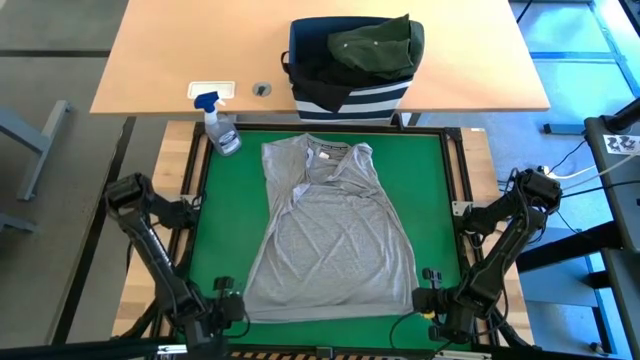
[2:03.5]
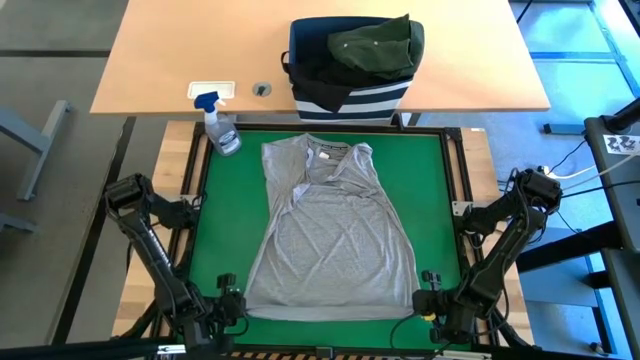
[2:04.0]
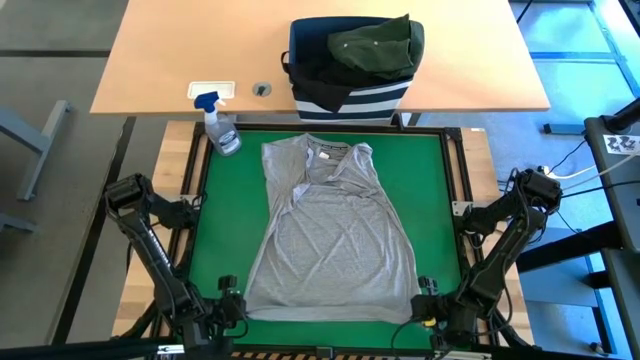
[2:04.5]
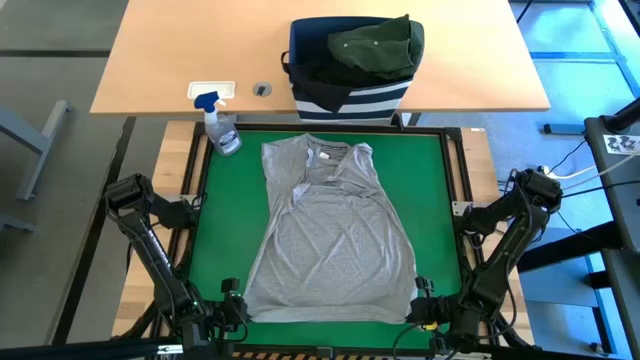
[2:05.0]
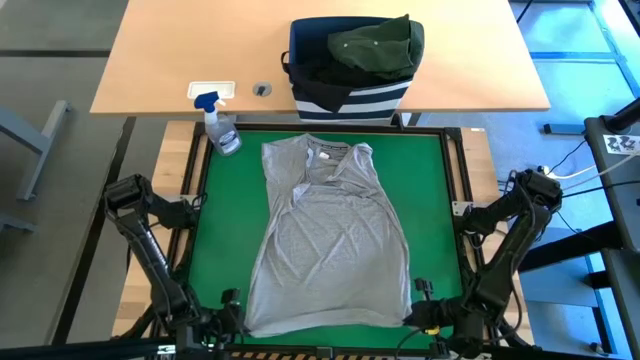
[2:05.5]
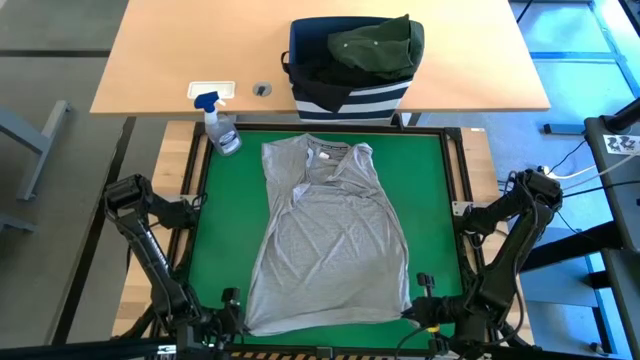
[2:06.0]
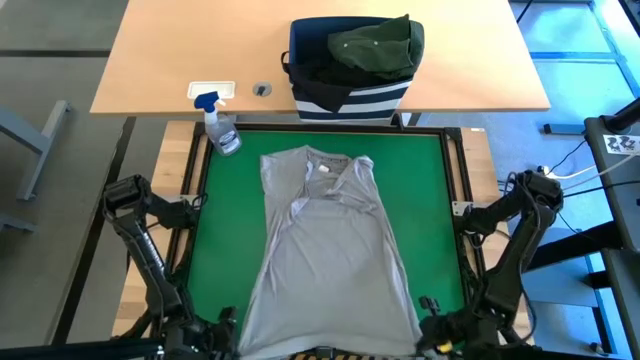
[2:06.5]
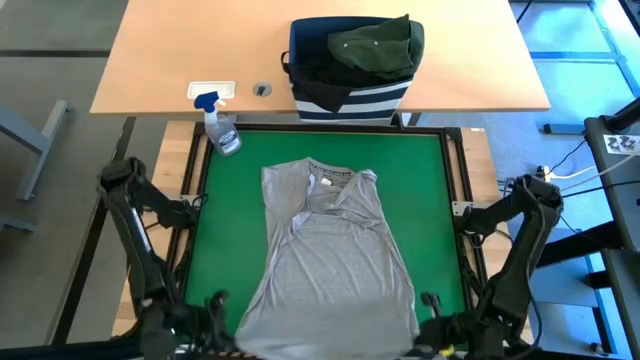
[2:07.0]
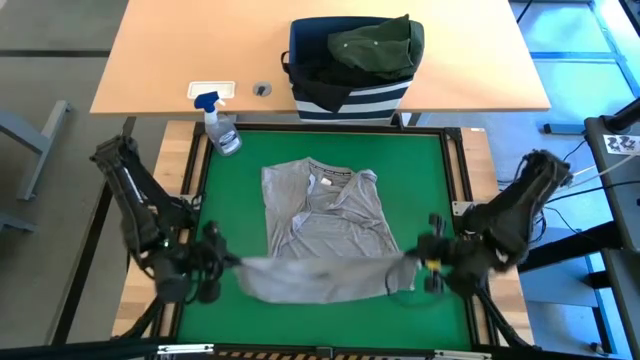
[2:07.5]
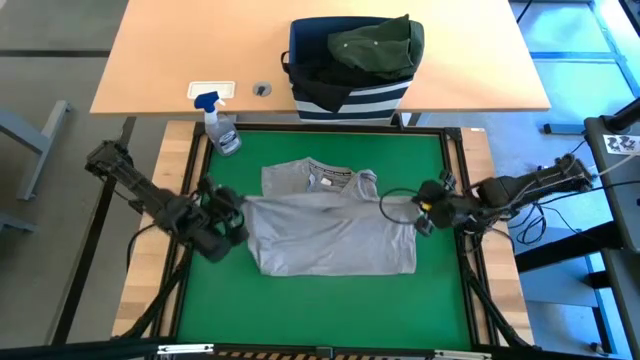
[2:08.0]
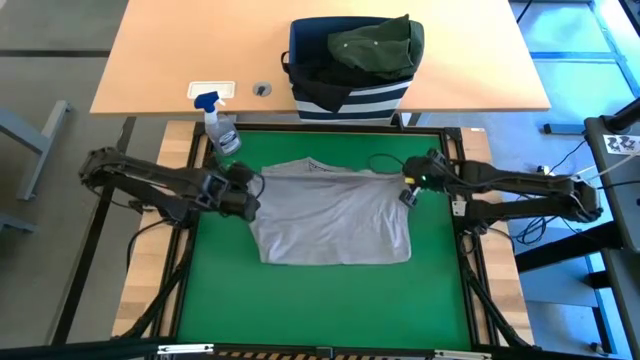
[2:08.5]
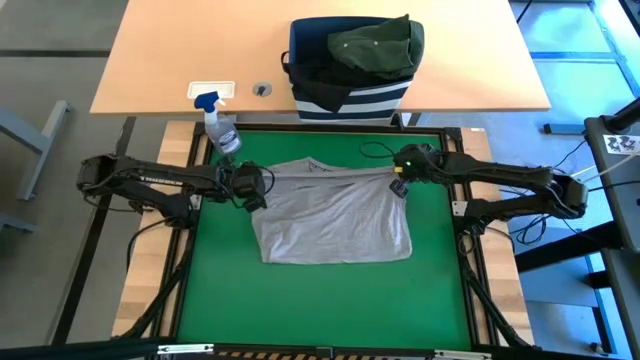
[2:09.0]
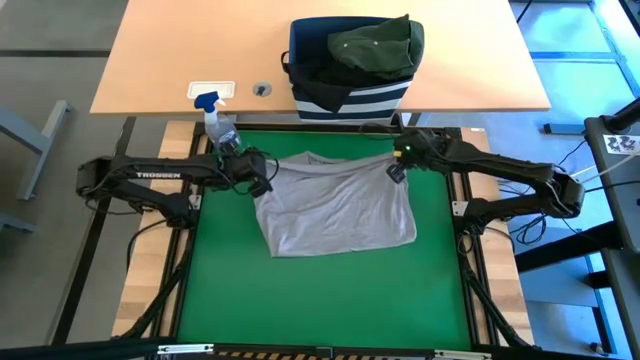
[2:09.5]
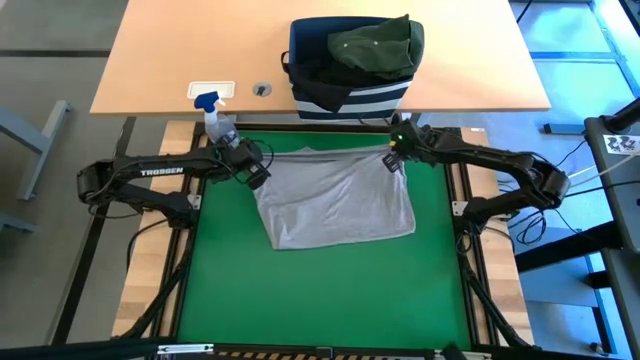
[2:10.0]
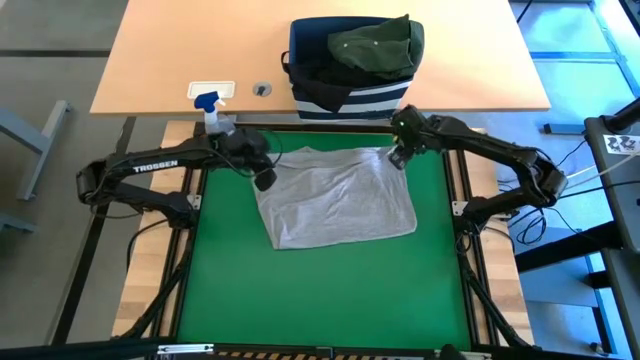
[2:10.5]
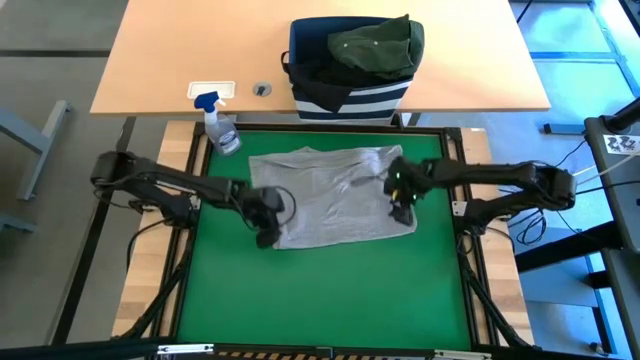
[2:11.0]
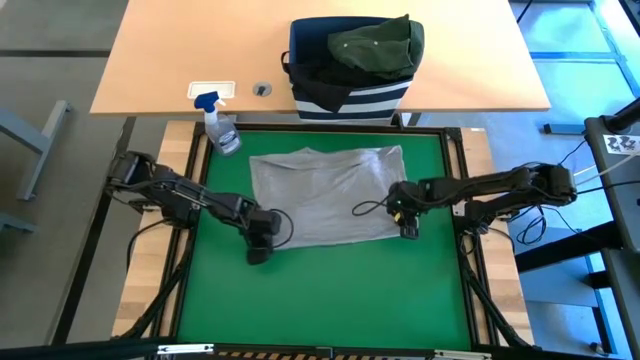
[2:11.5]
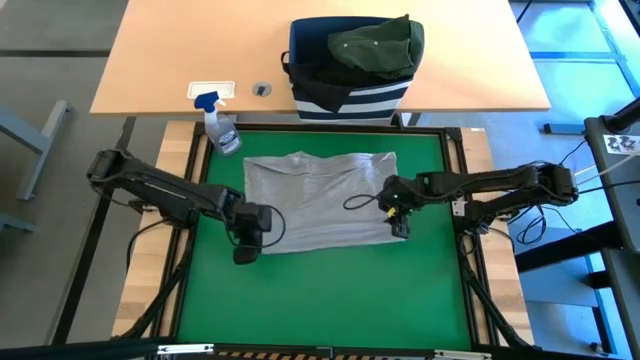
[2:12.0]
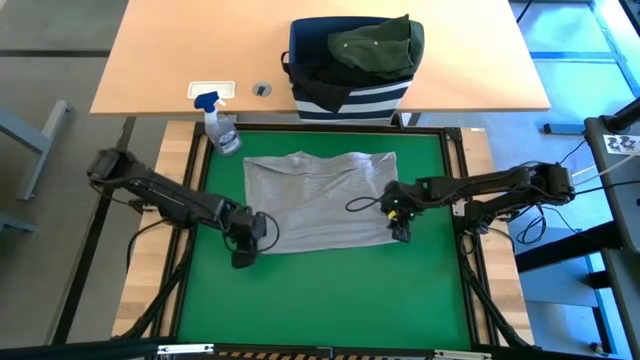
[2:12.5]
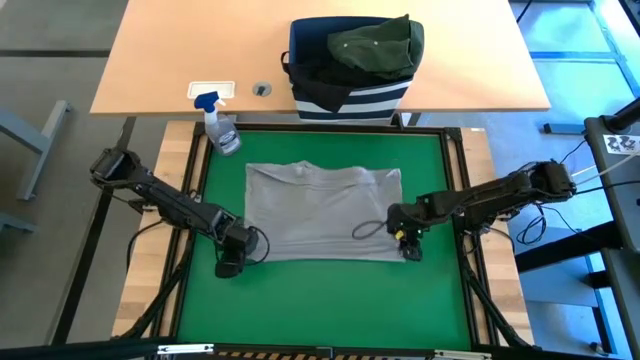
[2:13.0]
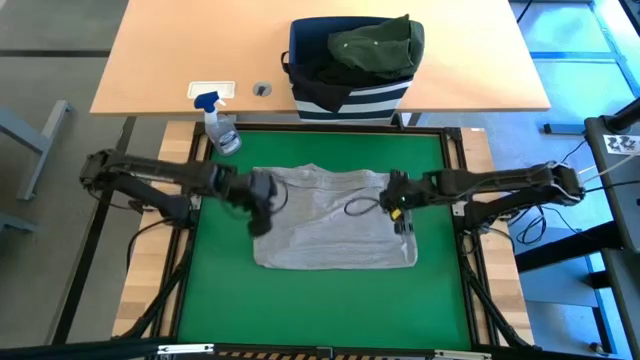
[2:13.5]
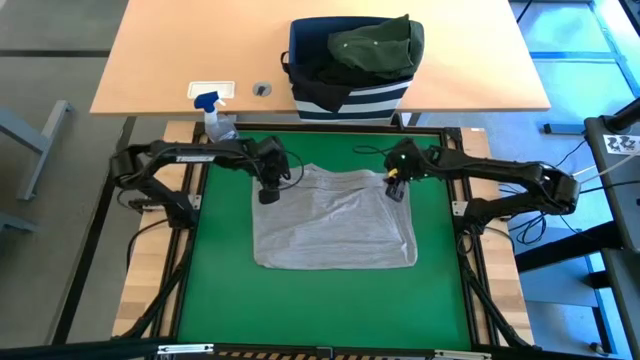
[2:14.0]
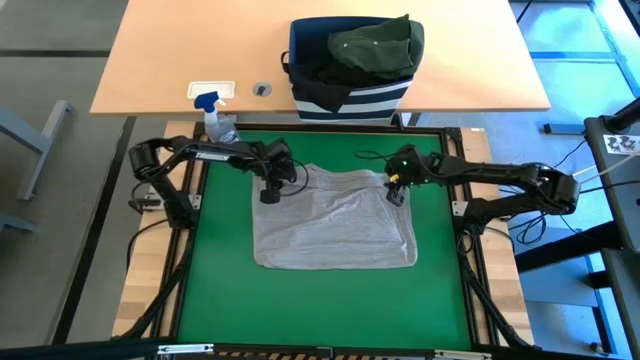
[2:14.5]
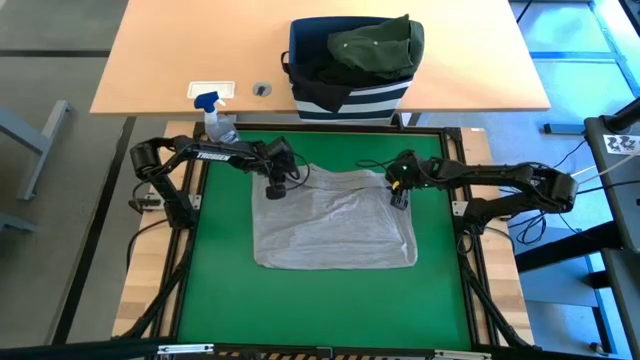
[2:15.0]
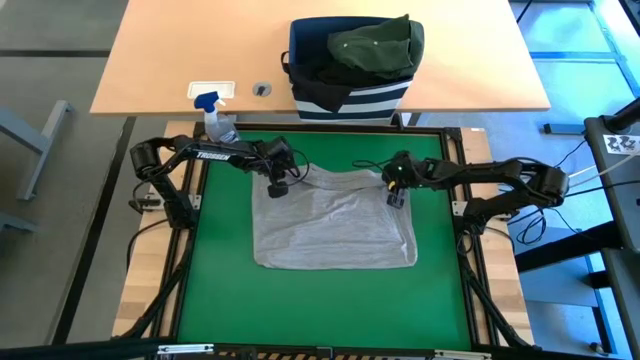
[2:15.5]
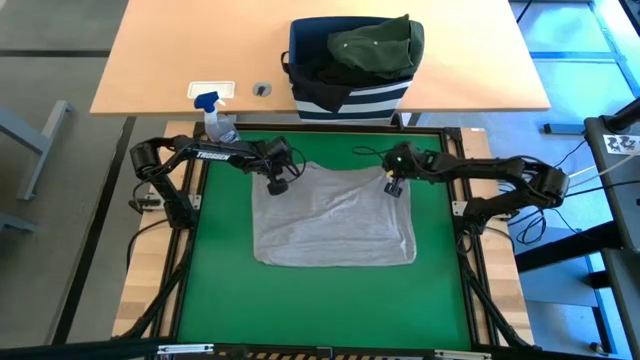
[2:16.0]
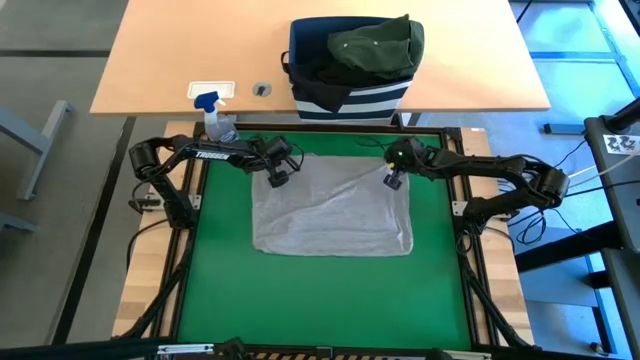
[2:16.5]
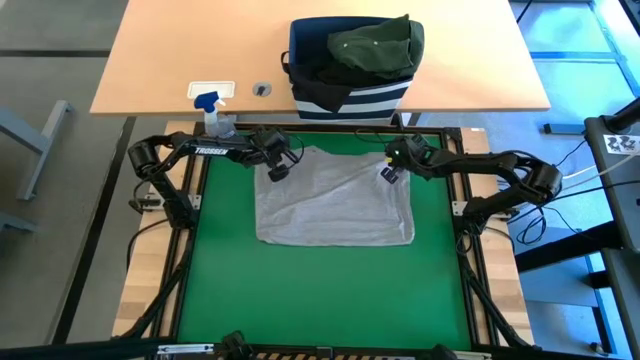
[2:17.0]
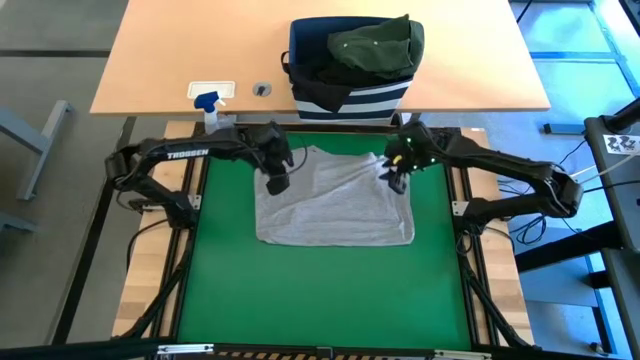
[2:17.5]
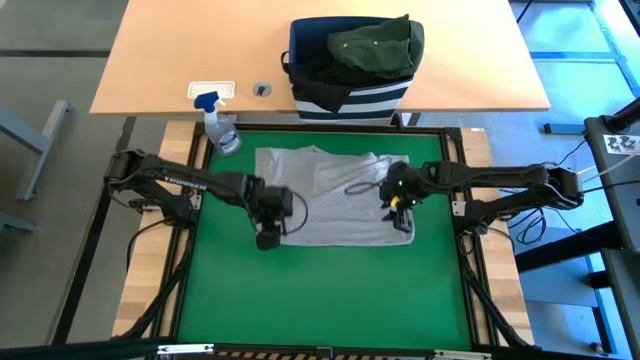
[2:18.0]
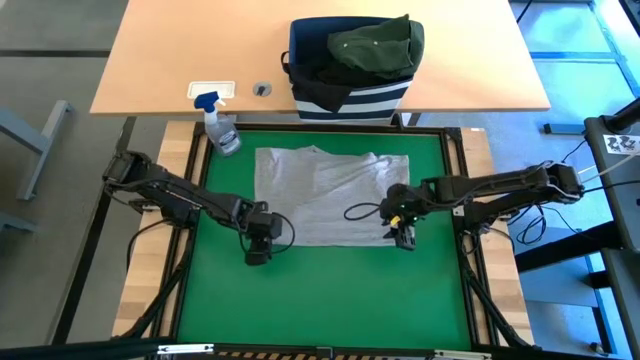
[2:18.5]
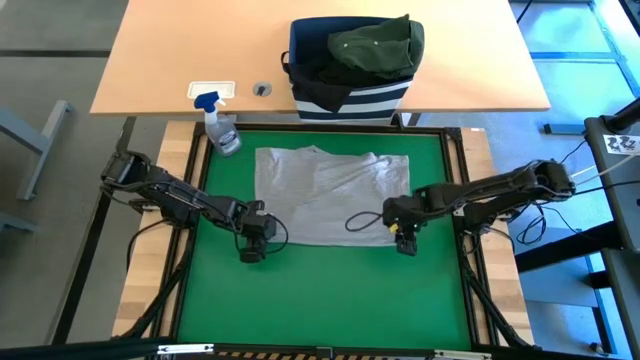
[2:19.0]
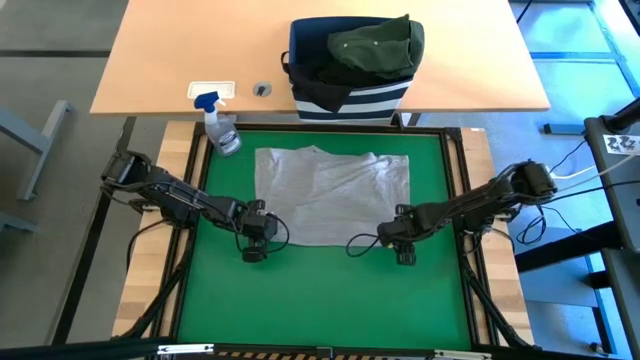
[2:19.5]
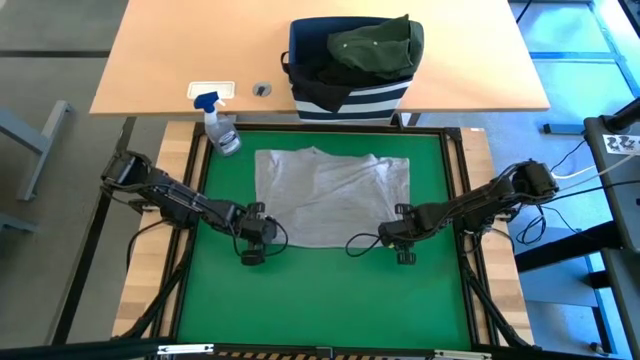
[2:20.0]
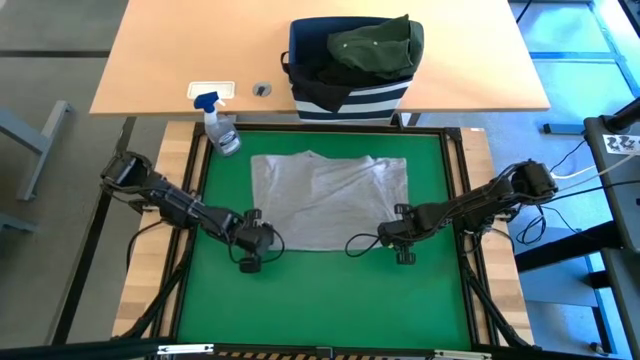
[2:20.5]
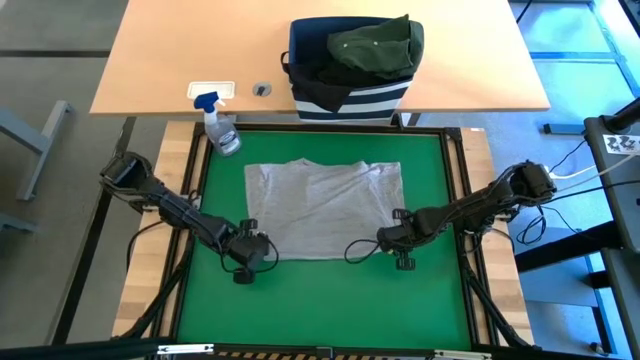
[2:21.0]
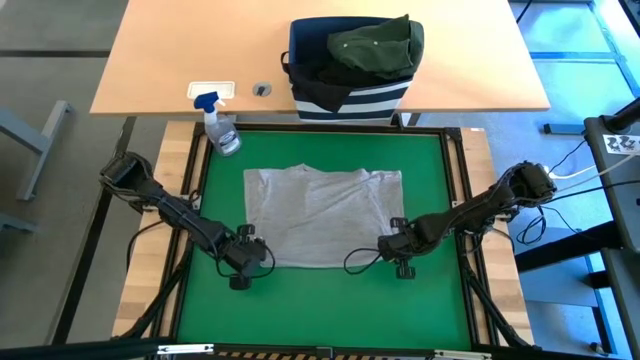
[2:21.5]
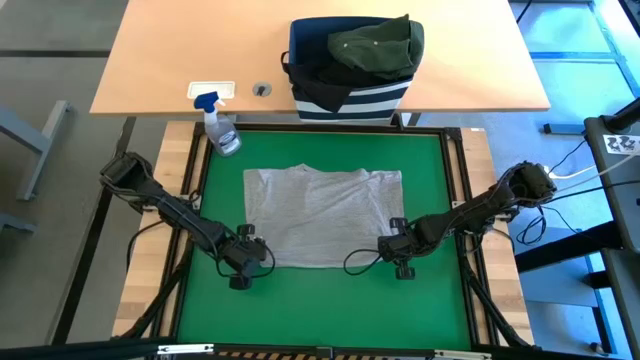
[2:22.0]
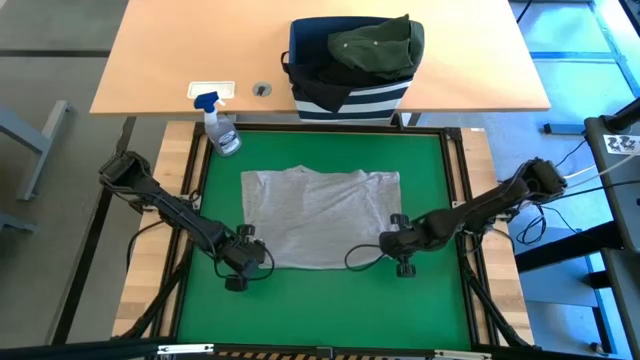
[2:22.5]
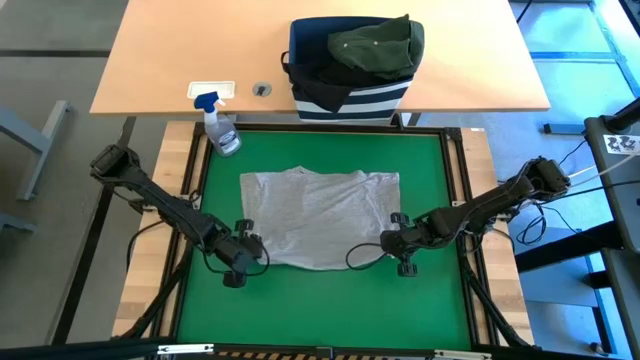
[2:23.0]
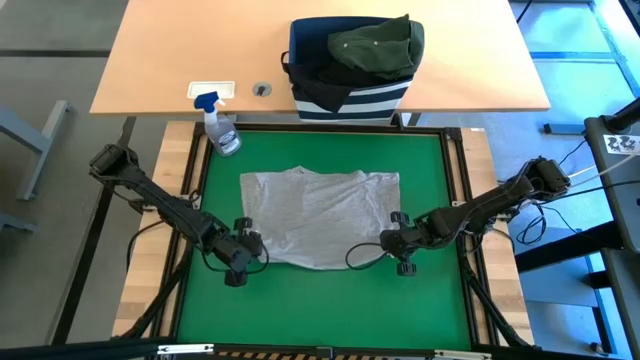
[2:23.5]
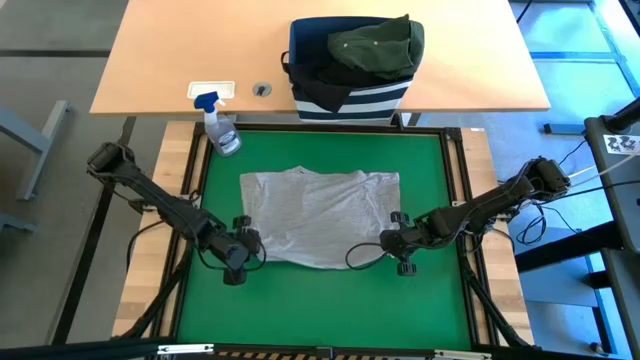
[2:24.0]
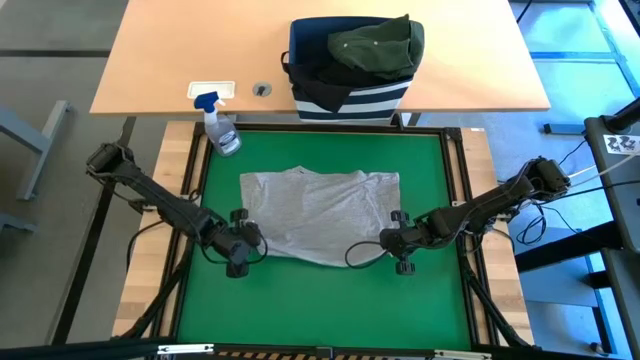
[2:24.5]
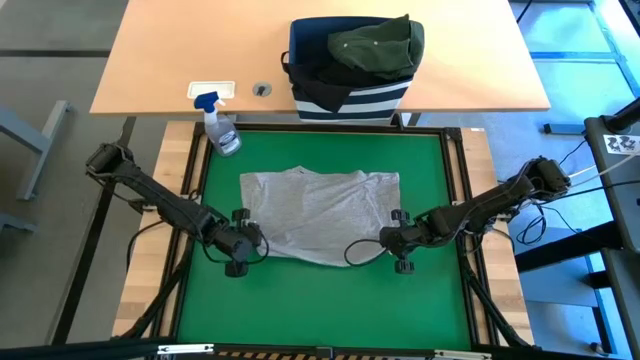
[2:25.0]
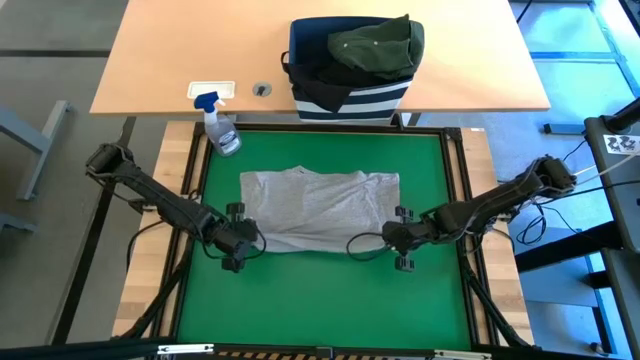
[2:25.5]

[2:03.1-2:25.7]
Task: Fold Laundry from Bin
Fold the gray shirt
